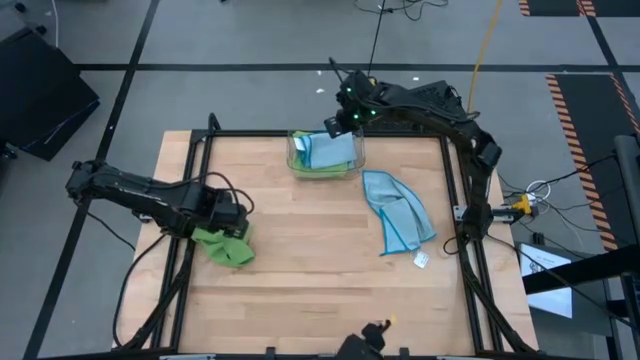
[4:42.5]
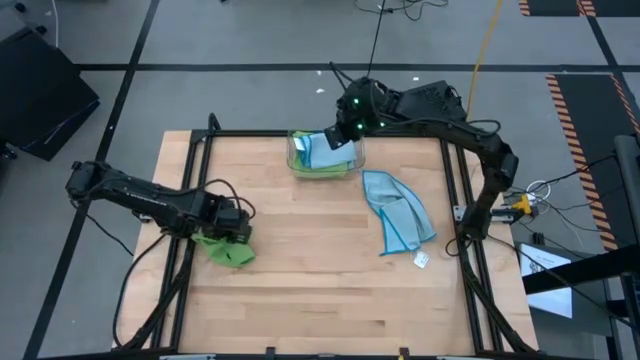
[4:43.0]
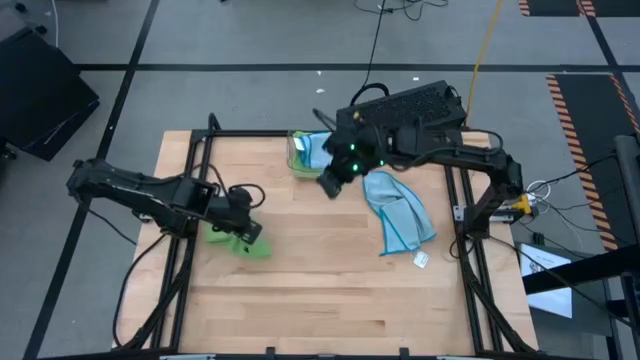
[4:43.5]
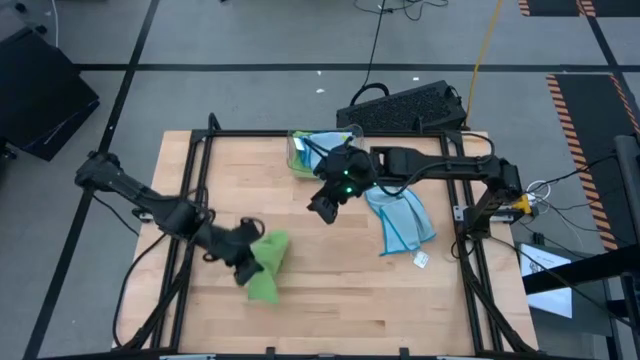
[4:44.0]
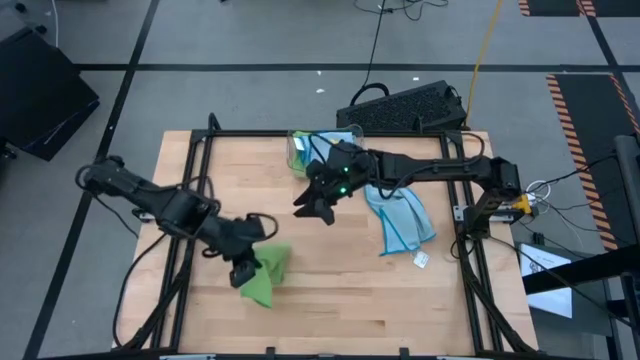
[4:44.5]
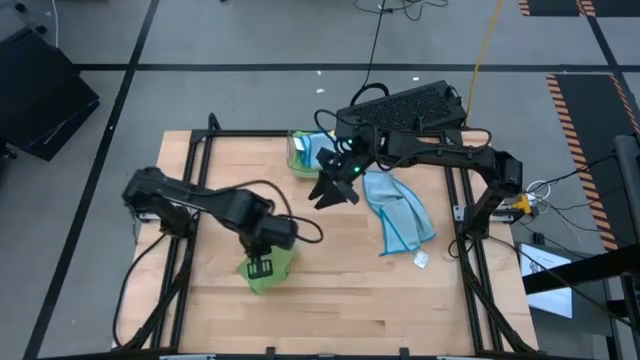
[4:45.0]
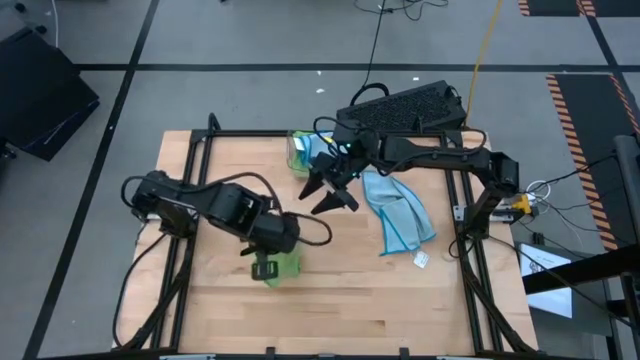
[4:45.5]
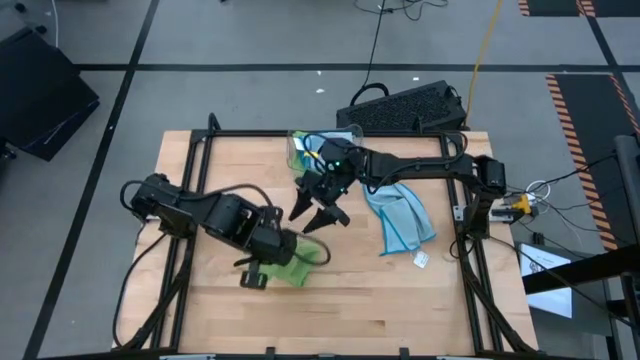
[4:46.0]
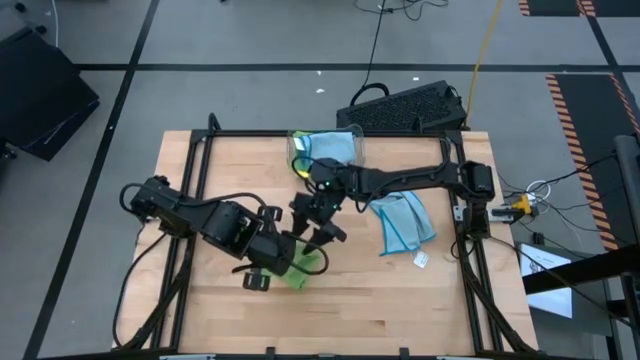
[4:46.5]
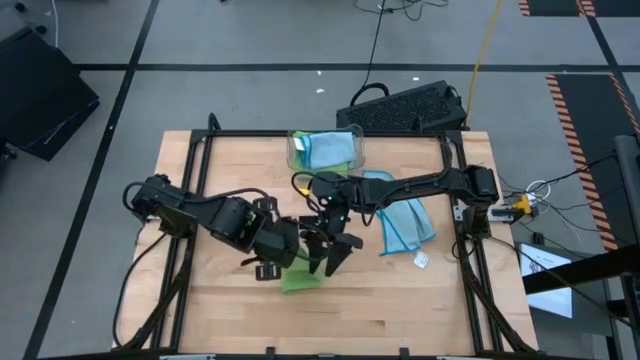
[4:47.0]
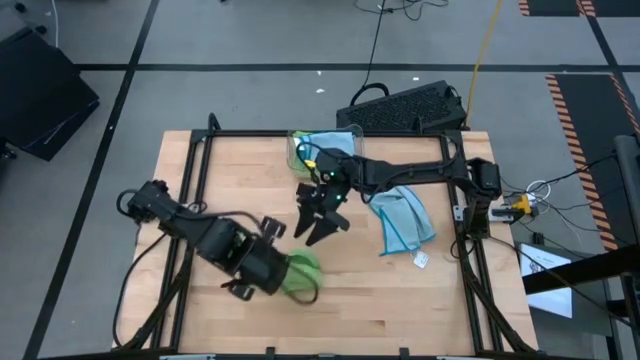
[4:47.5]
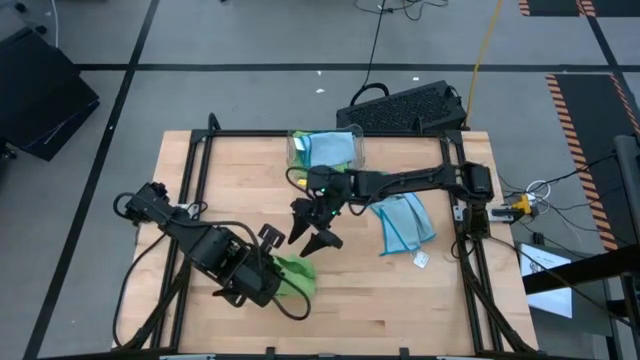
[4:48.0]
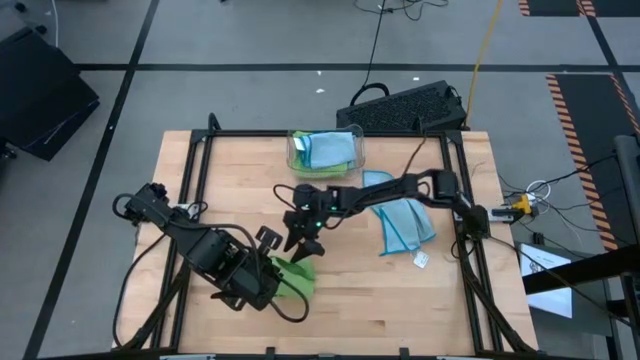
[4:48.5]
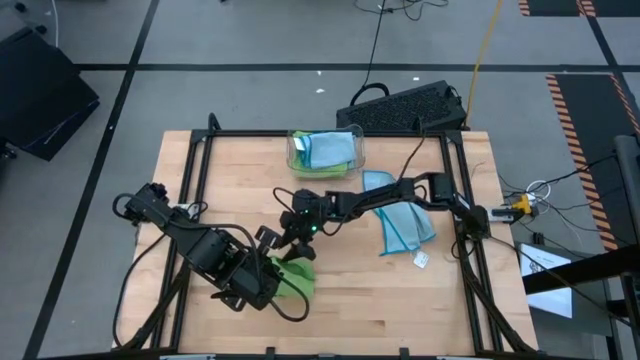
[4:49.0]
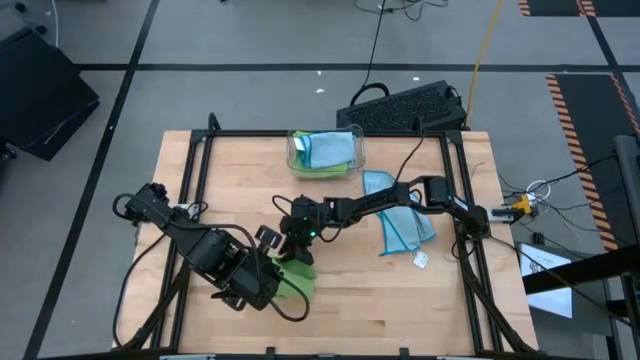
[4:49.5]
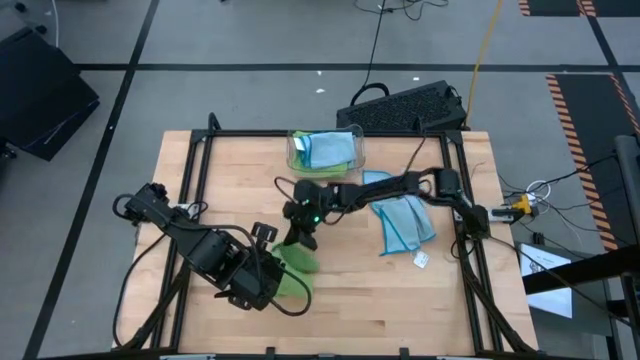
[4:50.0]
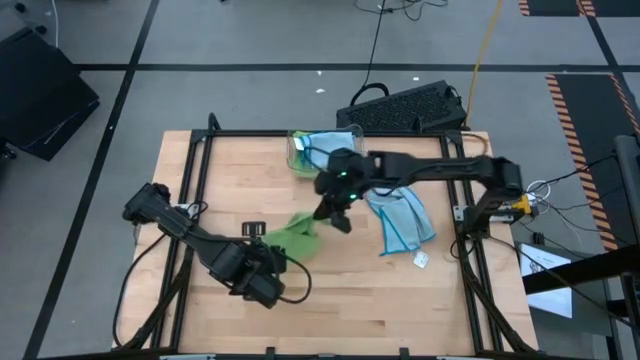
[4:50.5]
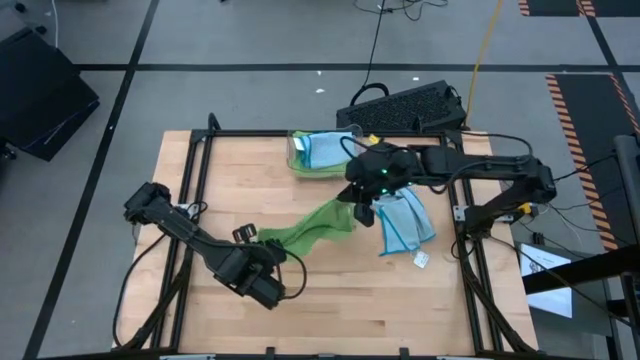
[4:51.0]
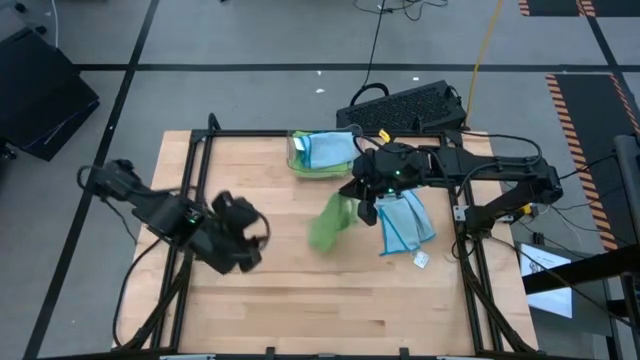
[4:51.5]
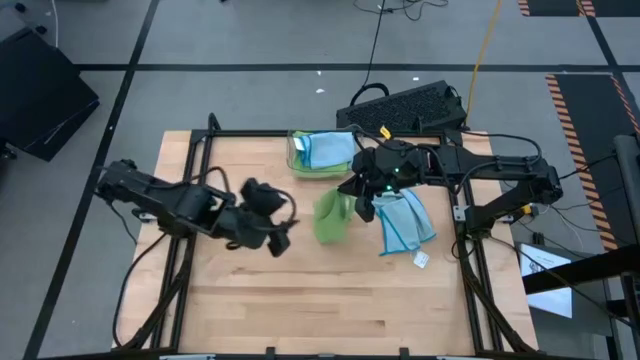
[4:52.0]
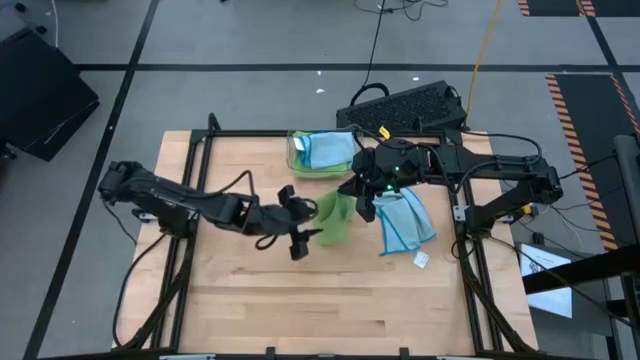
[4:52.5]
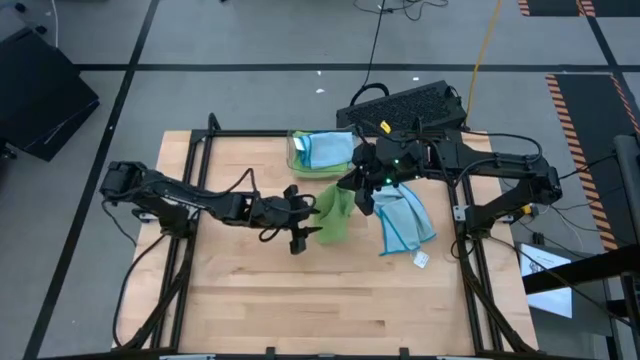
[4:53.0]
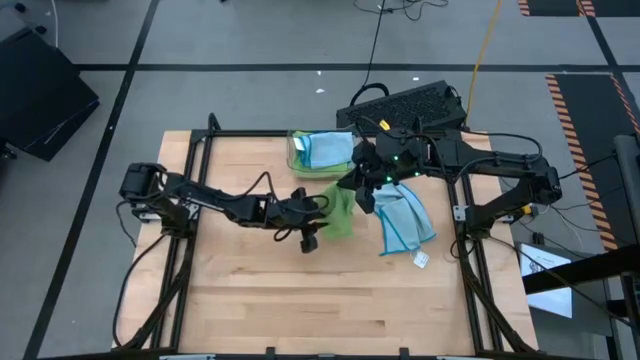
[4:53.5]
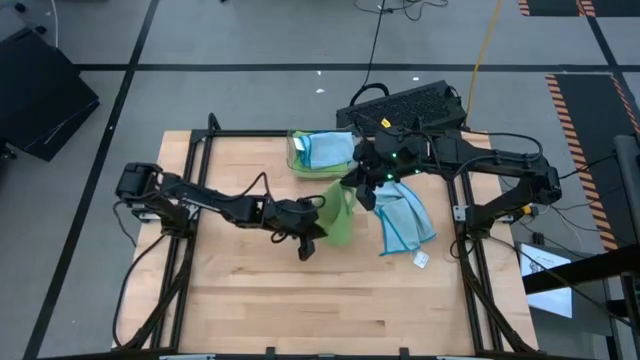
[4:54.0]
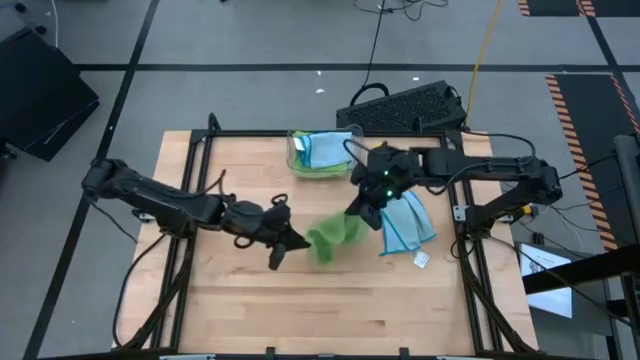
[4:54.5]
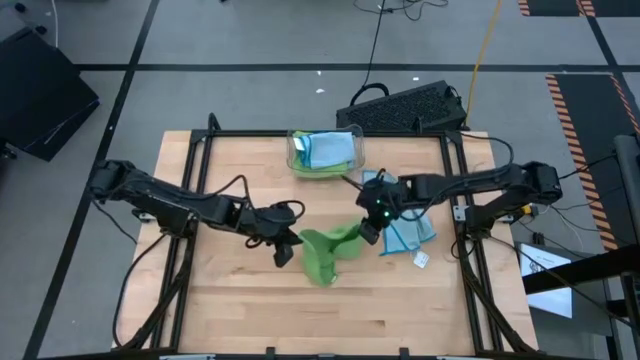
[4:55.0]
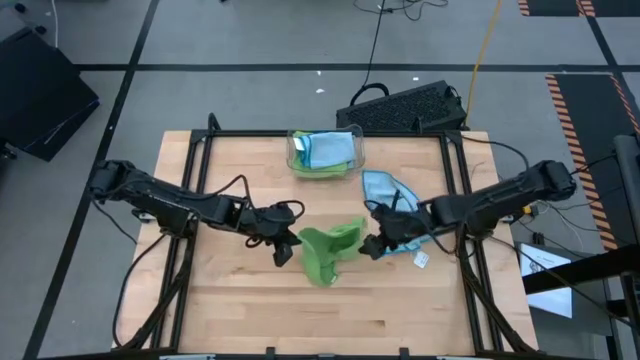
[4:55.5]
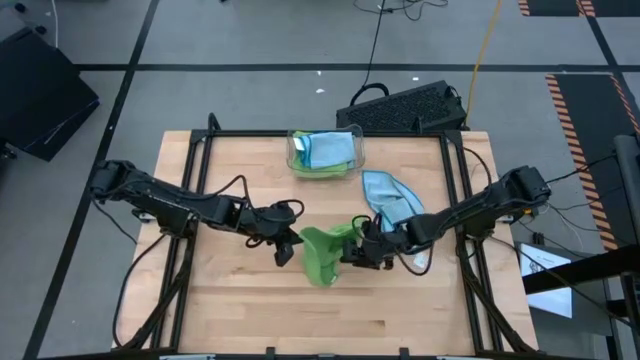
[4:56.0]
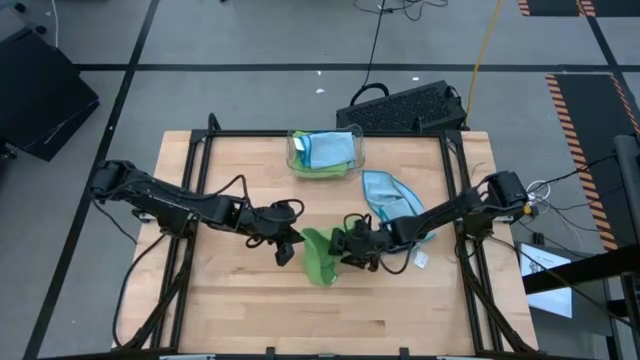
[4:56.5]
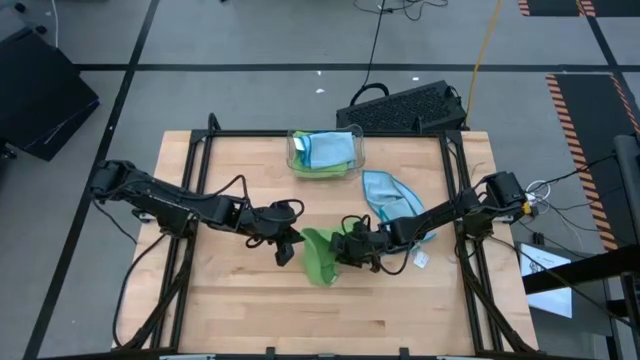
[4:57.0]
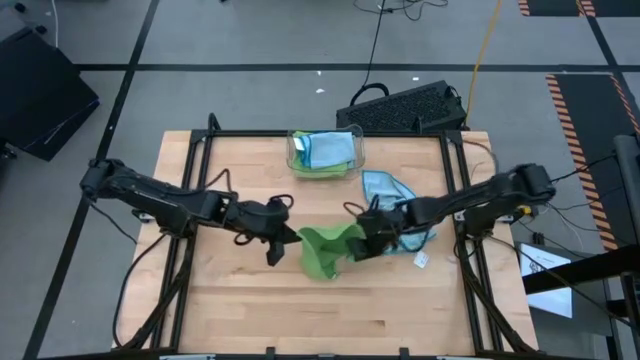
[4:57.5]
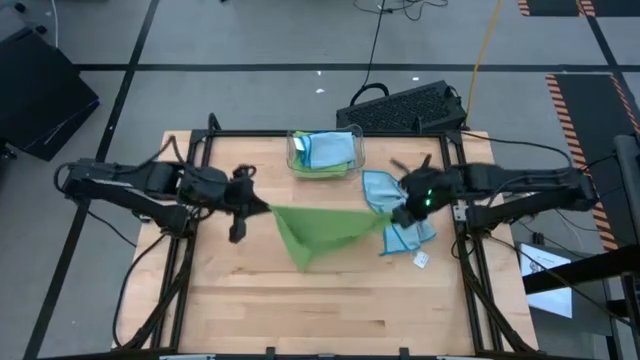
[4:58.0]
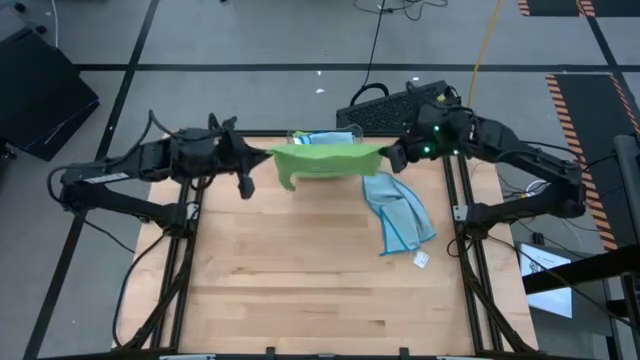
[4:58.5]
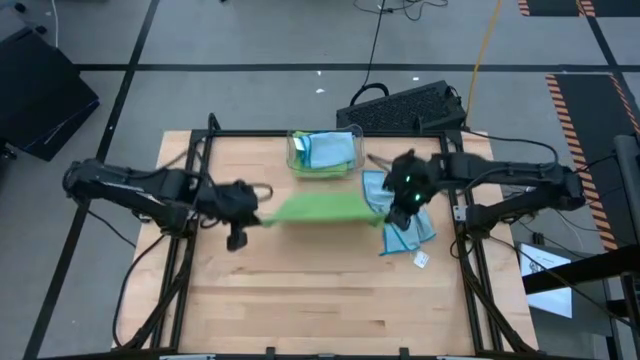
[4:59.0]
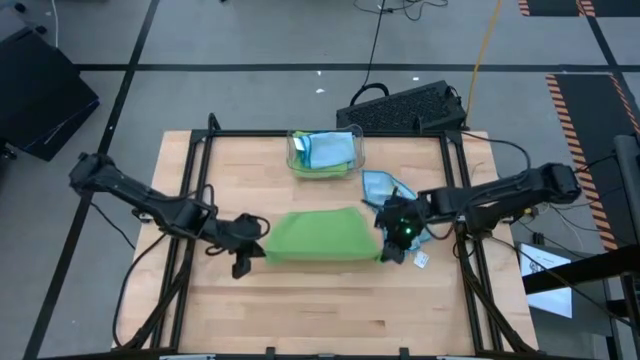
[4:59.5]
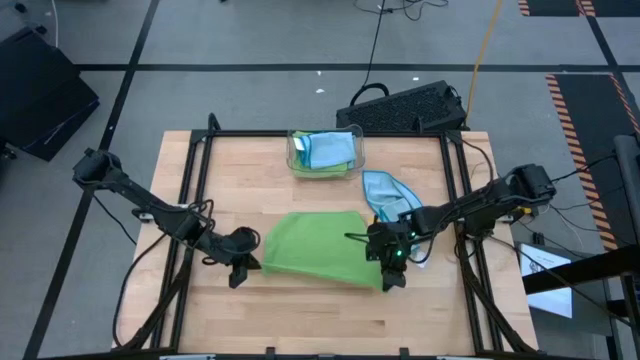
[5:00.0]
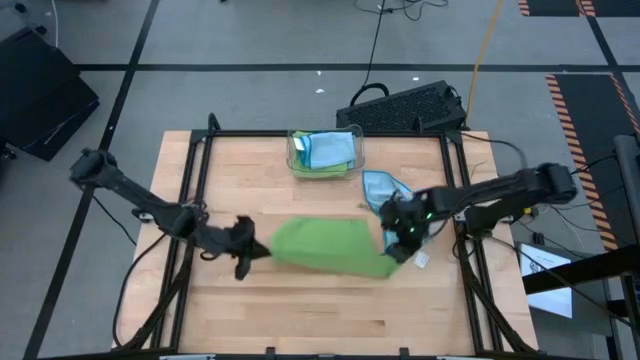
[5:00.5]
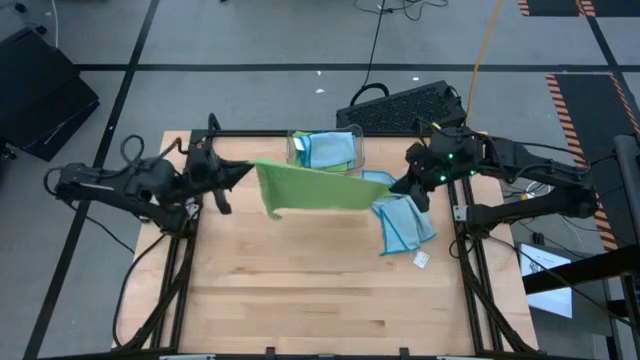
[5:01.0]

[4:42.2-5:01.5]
Task: Fold microfiber towels
Fold the green microfiber cloth

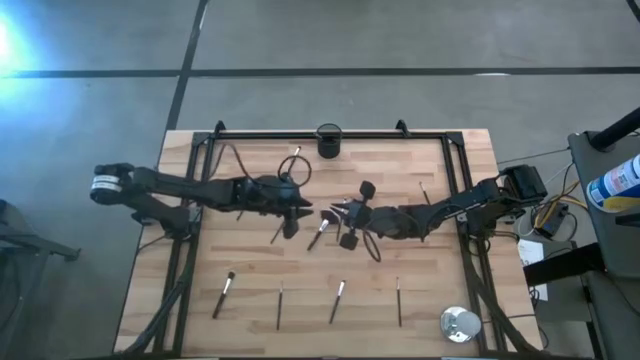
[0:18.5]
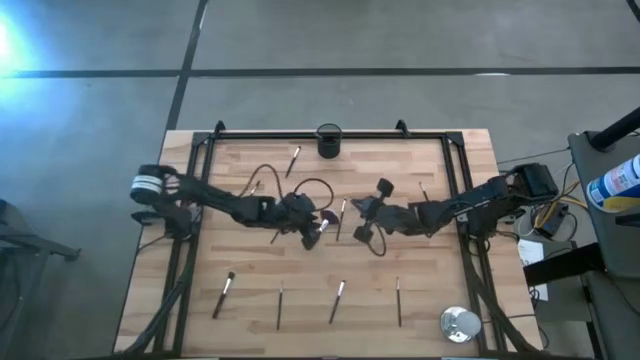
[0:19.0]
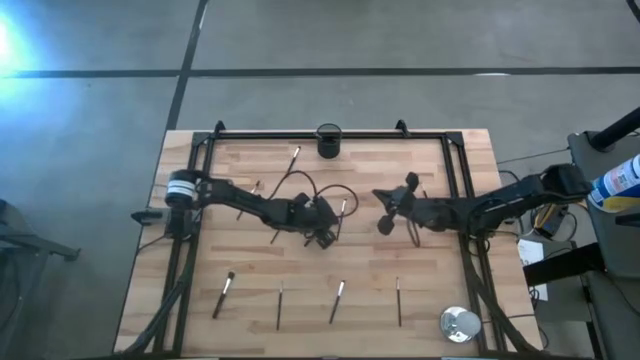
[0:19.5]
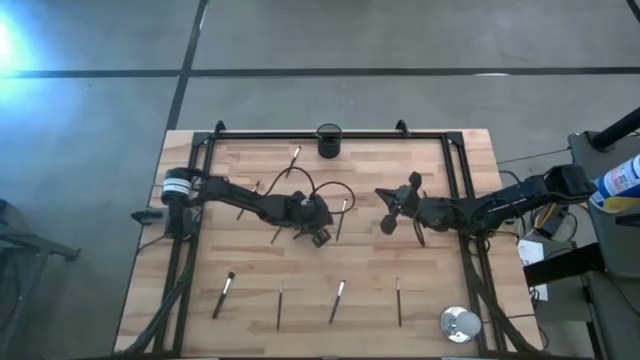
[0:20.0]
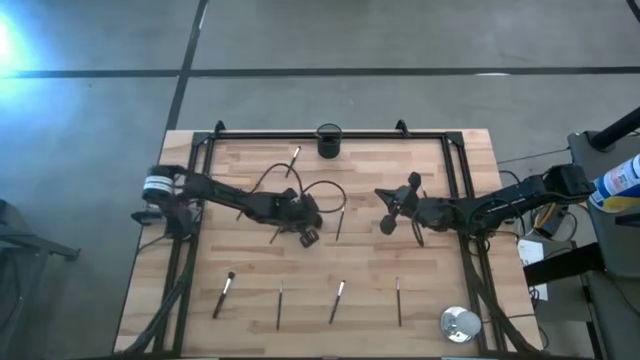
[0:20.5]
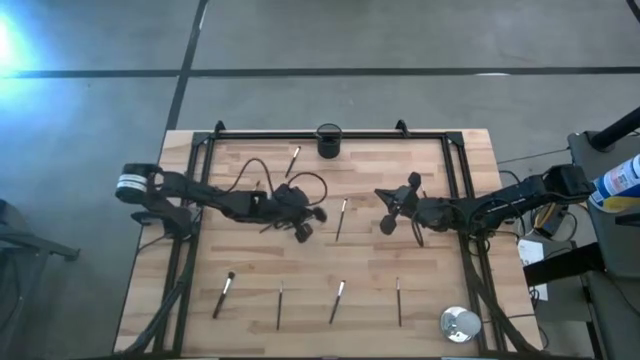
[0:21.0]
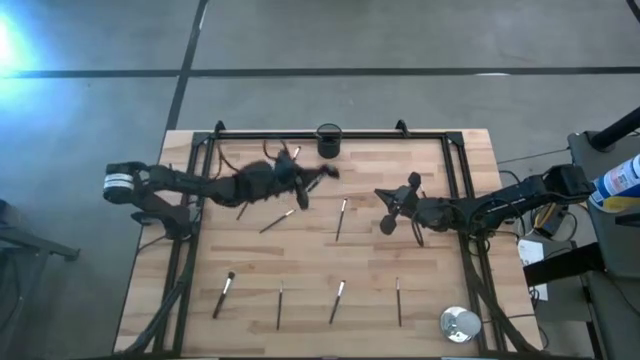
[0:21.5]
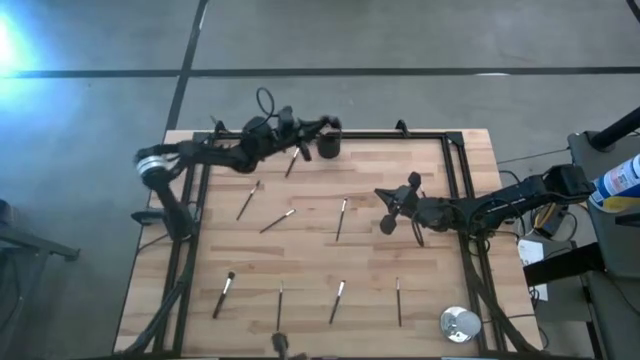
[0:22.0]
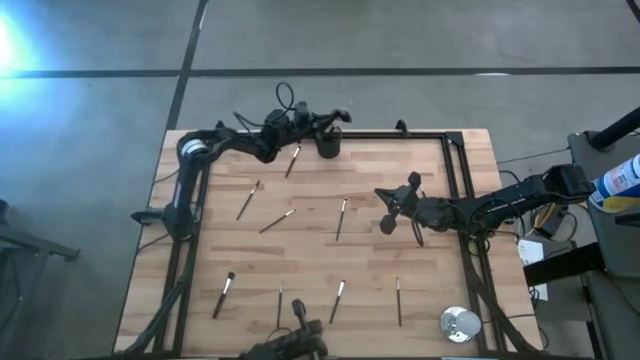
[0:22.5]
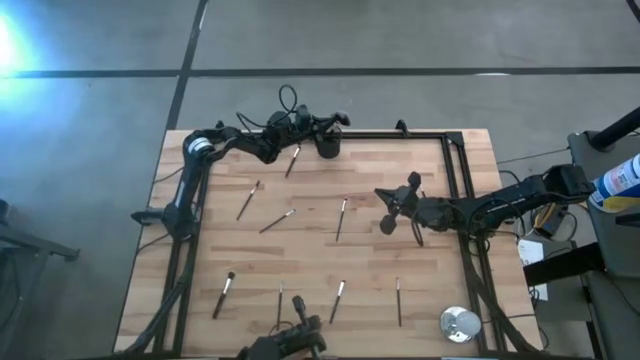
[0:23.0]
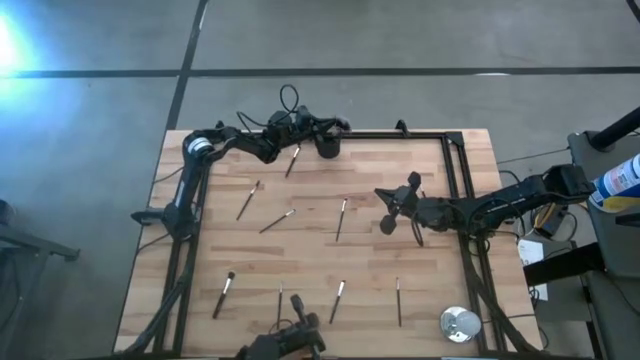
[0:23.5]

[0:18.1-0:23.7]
Task: Put items in baskets/containers
Put the black highlighter brush into the black pen holder
